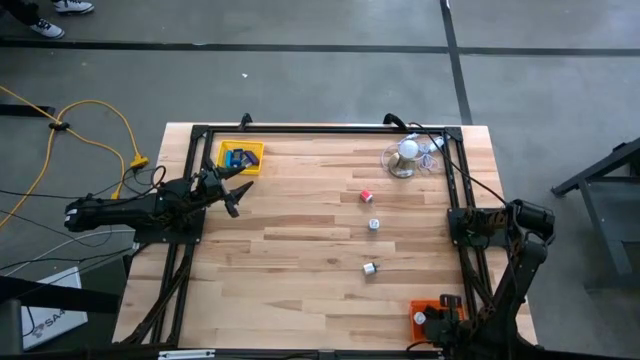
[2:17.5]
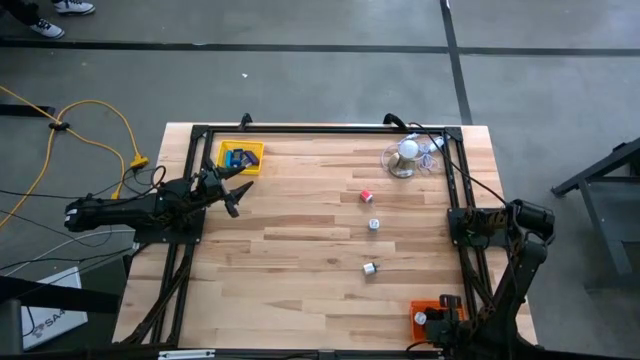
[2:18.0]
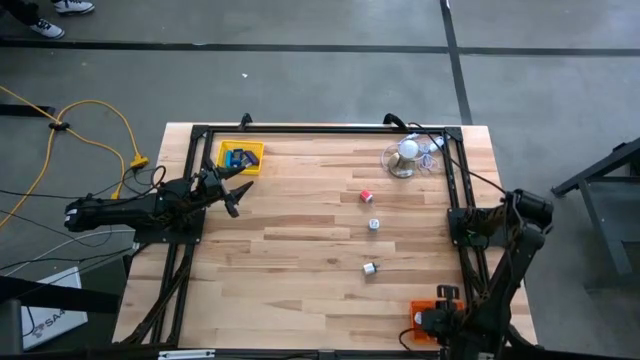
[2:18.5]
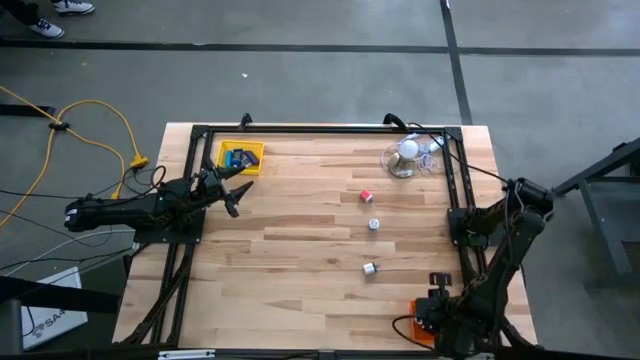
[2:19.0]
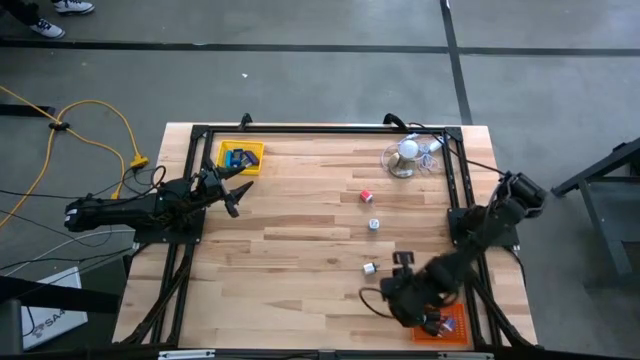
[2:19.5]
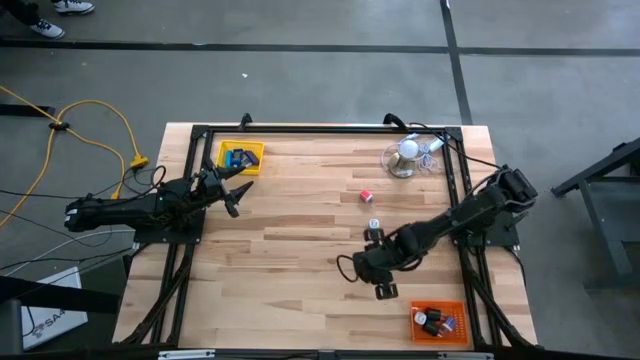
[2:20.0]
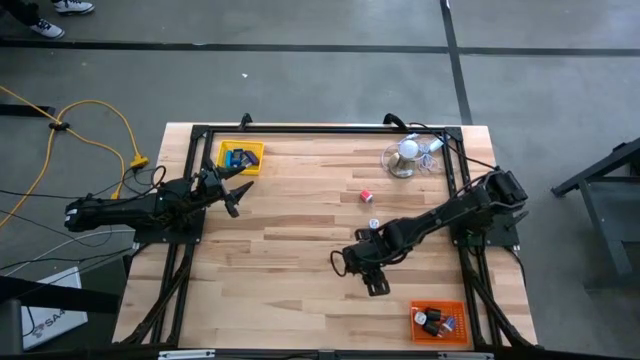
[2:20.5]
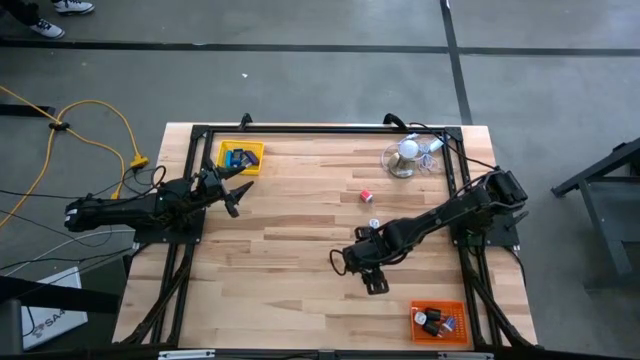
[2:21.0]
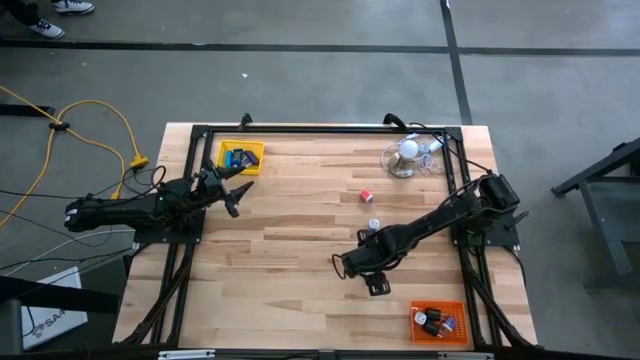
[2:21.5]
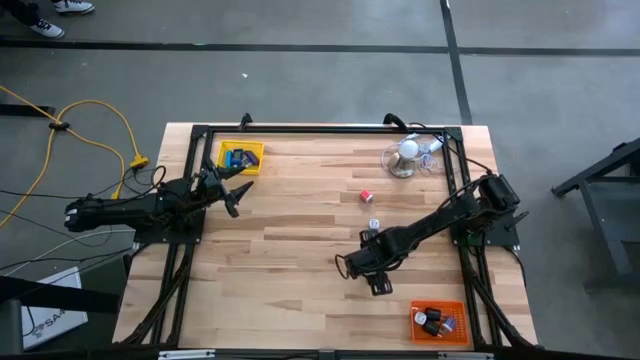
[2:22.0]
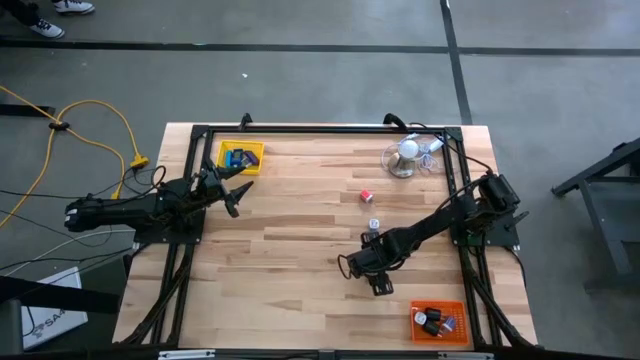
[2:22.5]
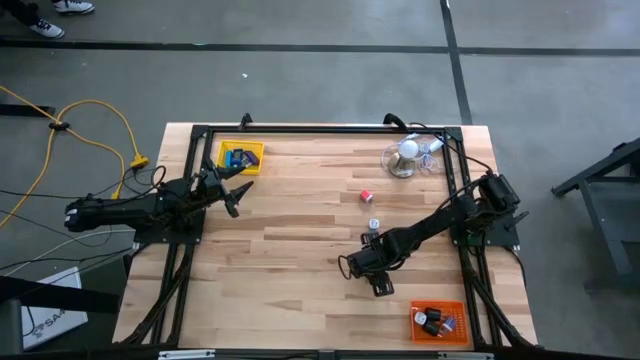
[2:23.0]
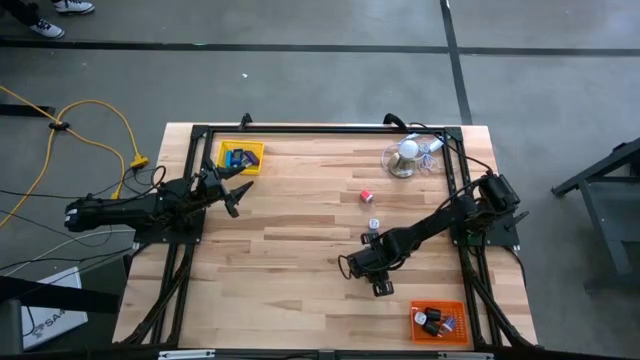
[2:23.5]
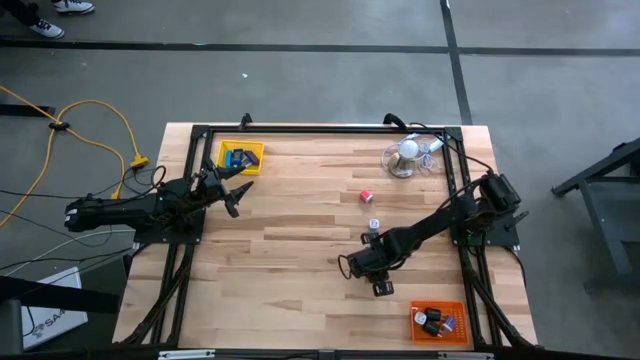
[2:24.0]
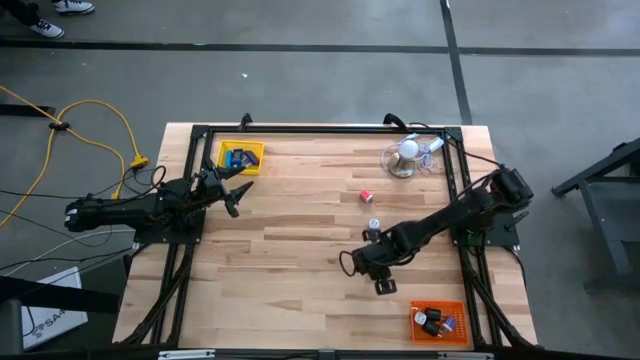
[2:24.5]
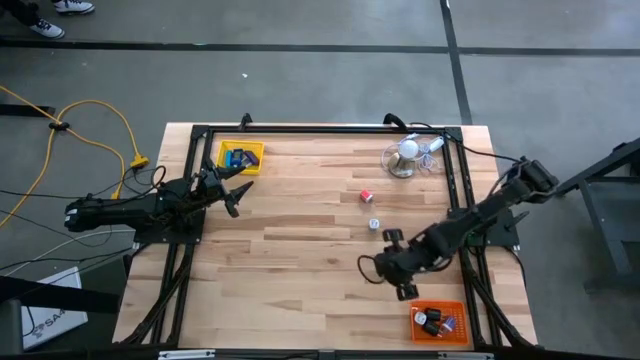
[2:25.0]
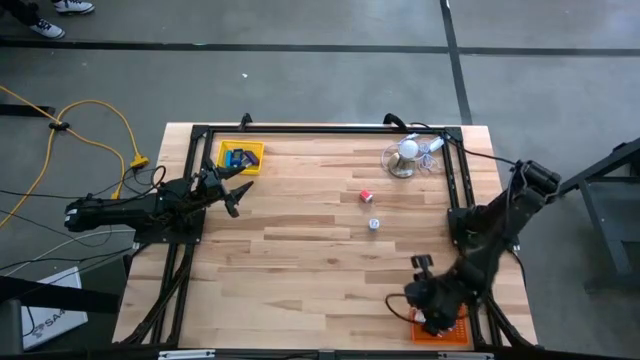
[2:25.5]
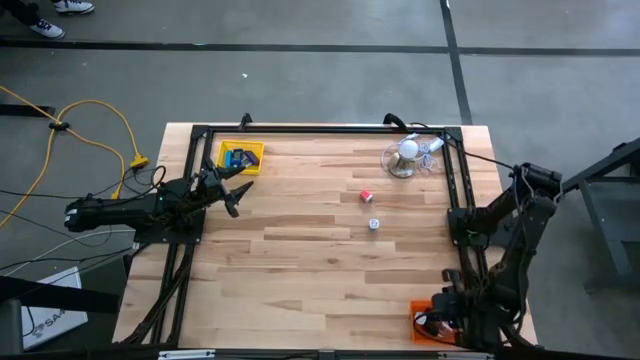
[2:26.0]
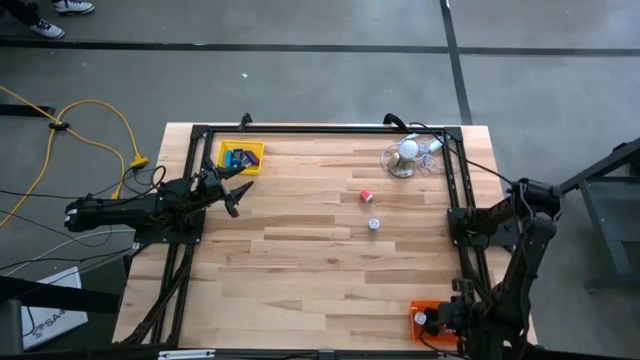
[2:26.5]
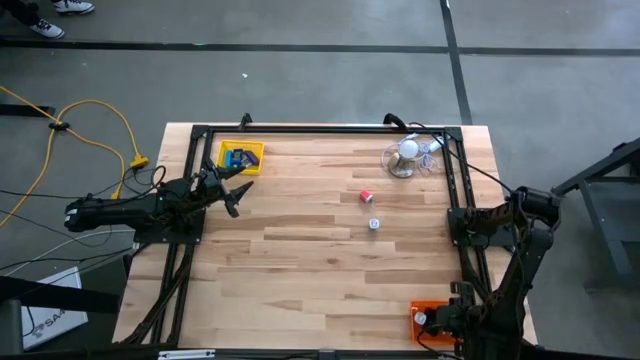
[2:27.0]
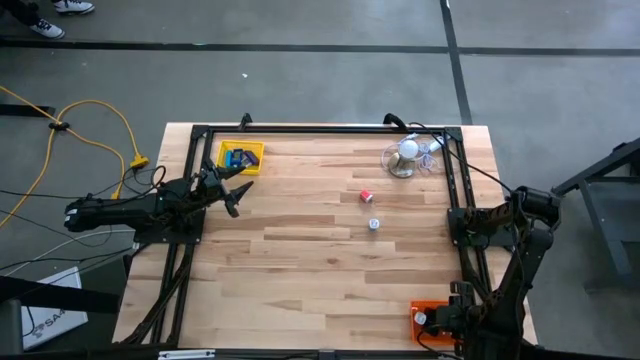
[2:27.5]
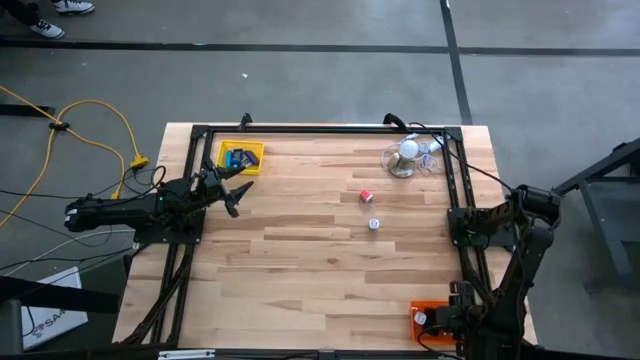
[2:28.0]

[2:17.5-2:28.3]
Task: Pick & Place Office items
Put the white charger adapter into the orange bin

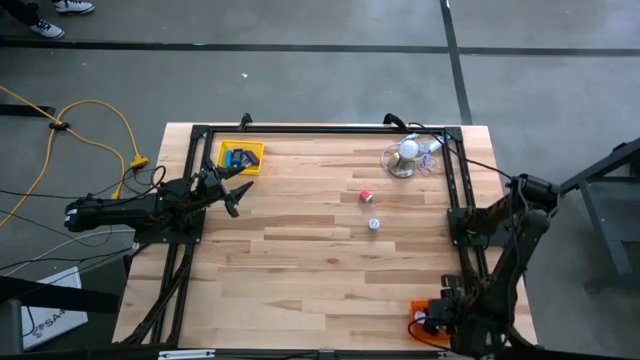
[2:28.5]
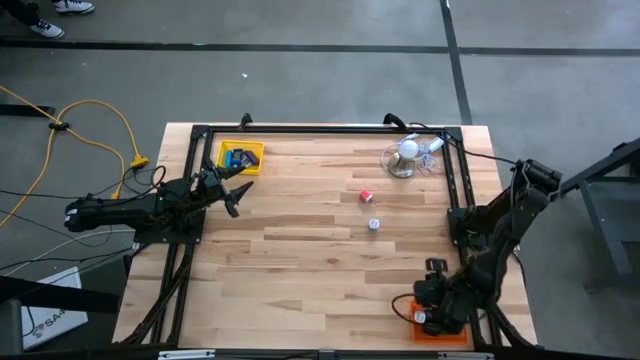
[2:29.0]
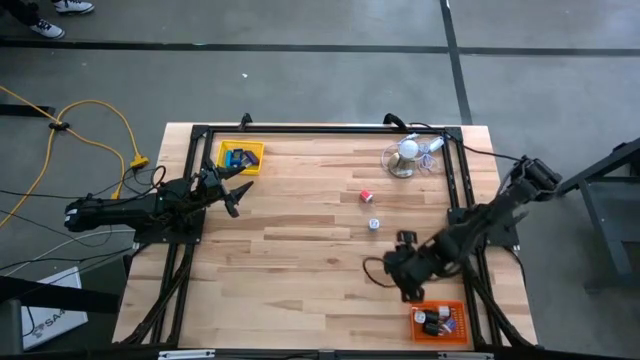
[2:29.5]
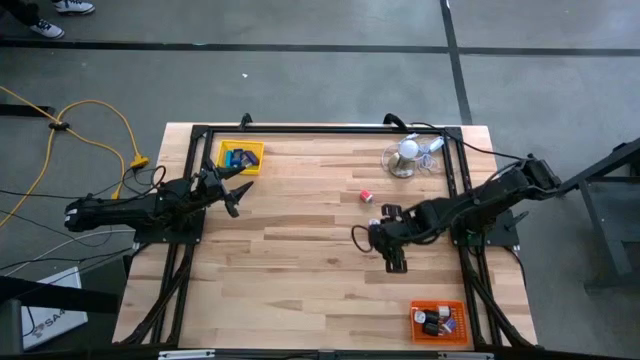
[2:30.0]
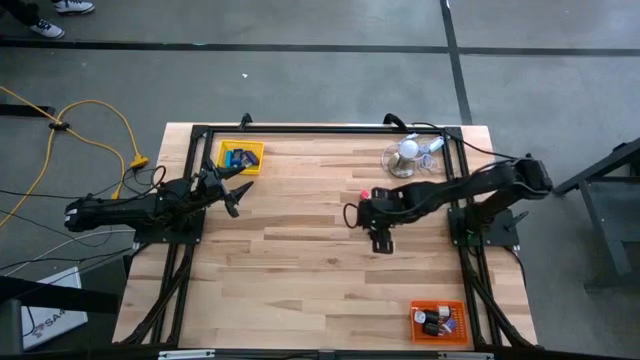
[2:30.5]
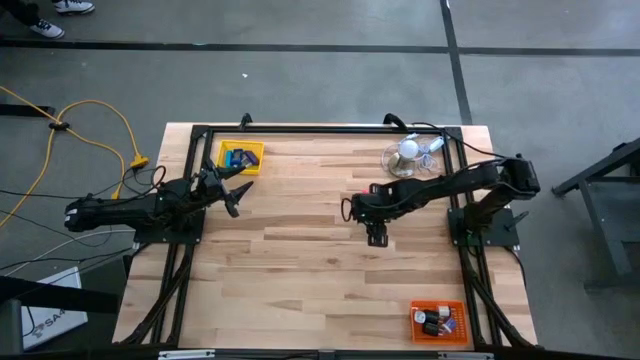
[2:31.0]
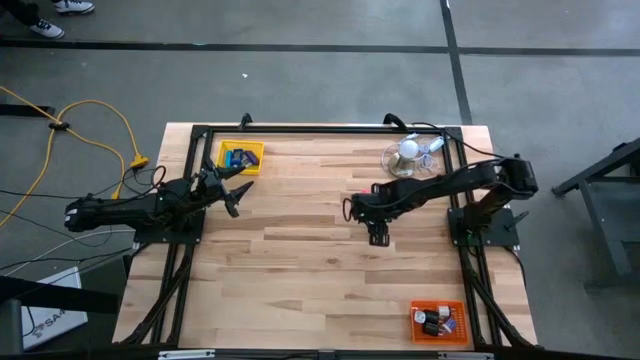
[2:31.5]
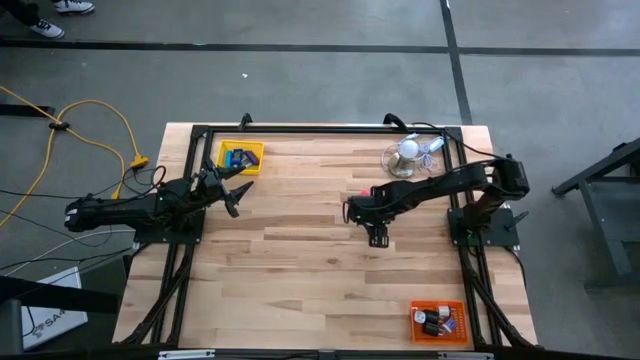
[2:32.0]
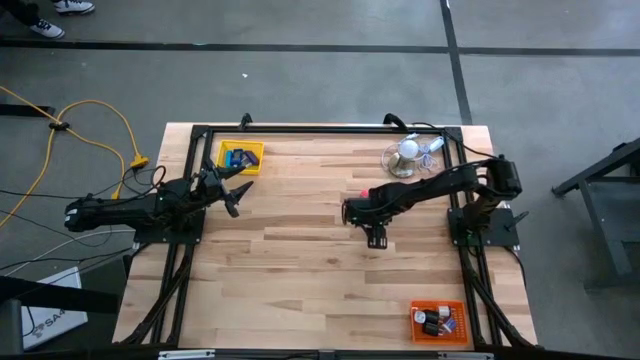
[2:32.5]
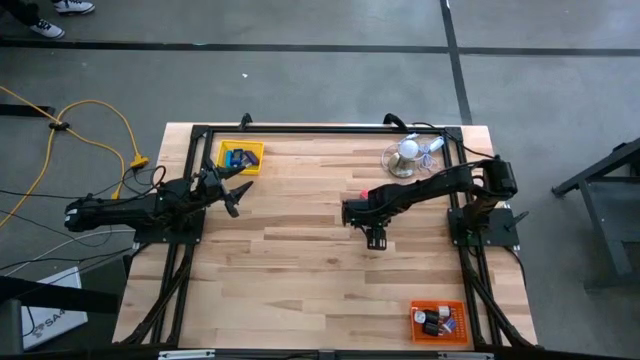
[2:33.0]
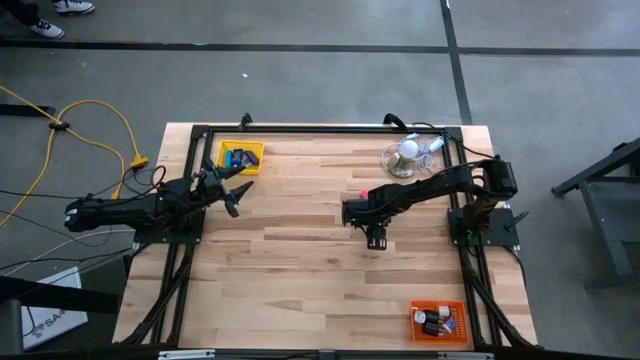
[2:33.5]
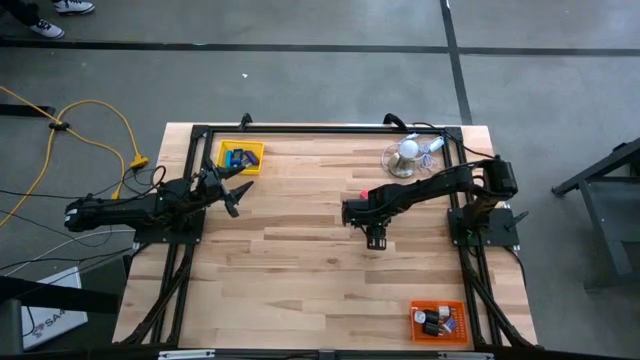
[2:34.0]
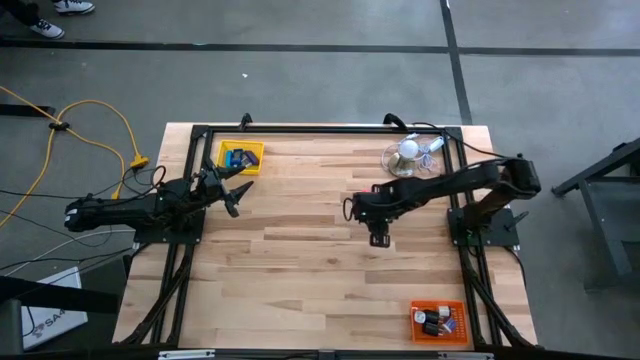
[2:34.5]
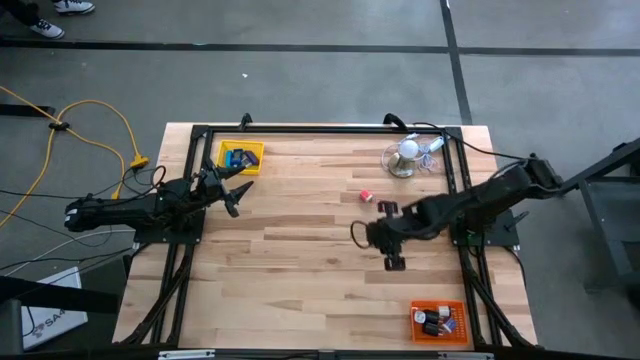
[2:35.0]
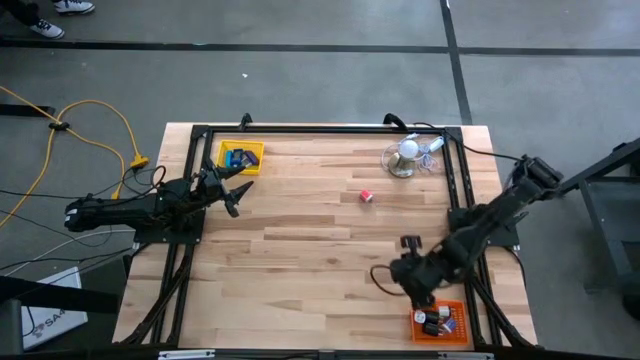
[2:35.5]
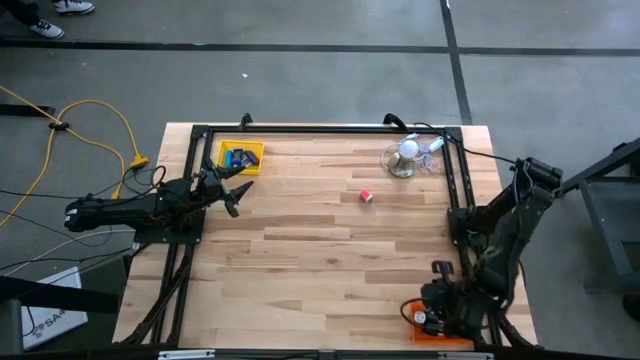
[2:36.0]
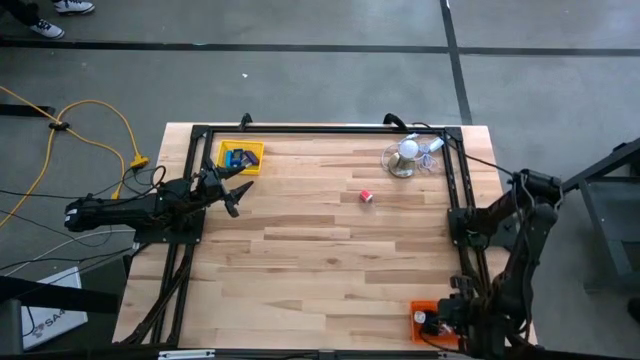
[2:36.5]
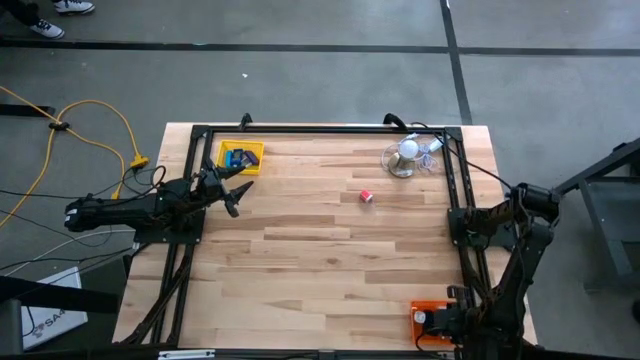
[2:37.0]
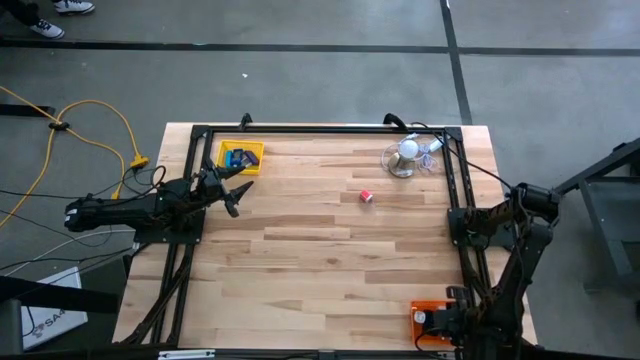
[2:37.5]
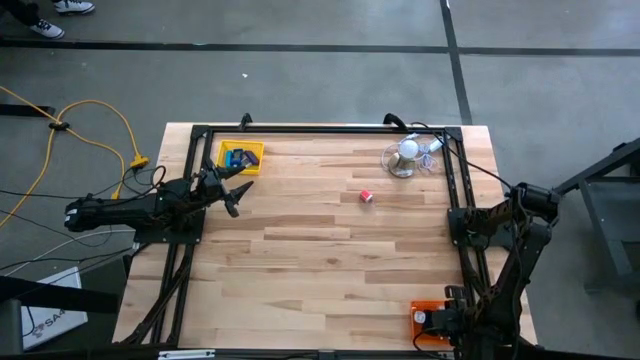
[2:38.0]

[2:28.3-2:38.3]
Put the blue charger adapter into the orange bin
